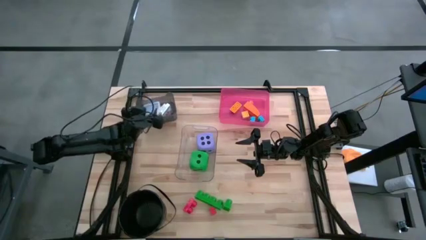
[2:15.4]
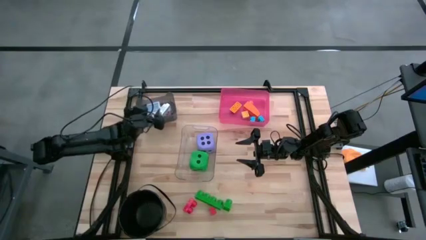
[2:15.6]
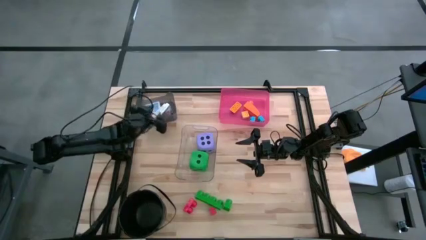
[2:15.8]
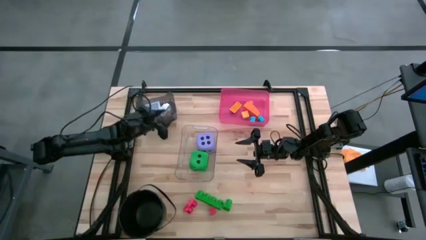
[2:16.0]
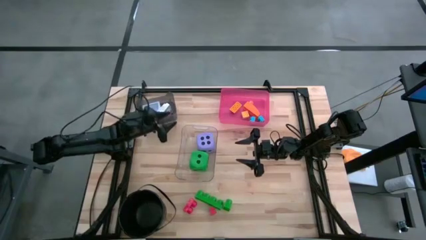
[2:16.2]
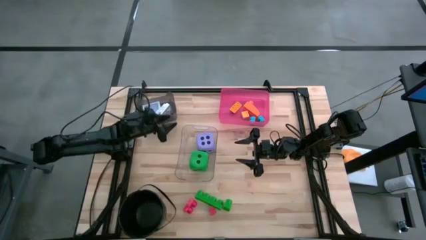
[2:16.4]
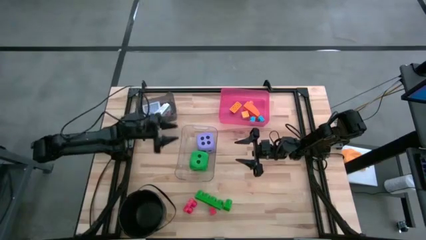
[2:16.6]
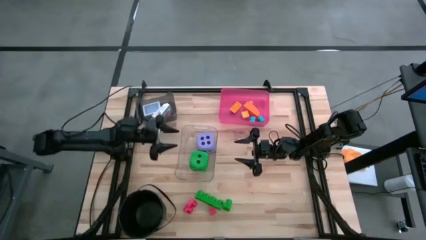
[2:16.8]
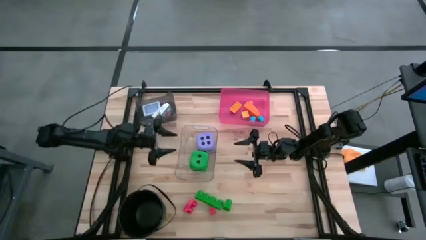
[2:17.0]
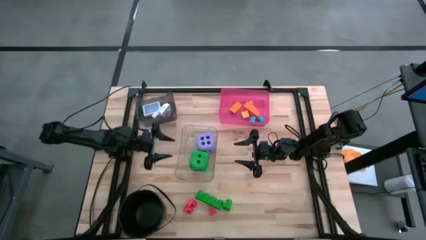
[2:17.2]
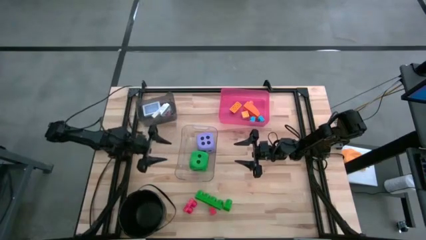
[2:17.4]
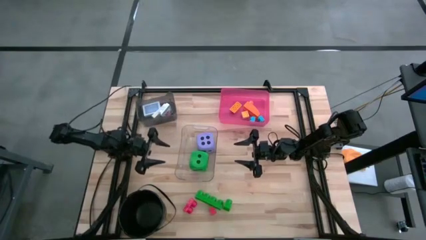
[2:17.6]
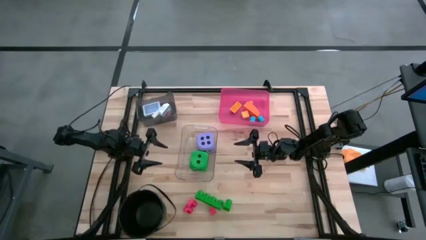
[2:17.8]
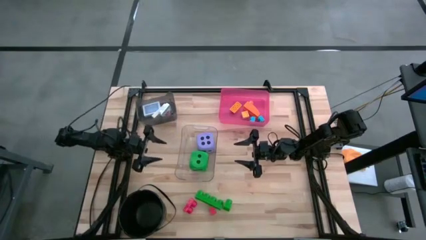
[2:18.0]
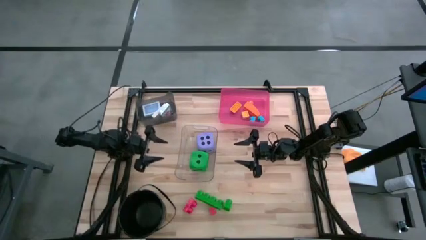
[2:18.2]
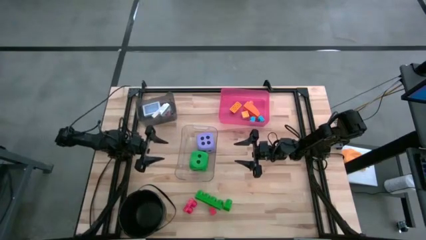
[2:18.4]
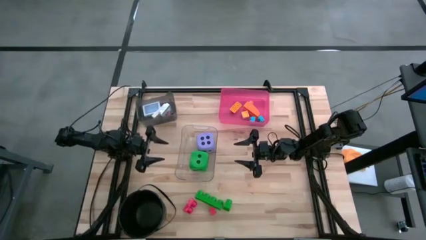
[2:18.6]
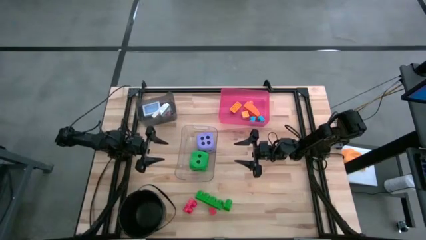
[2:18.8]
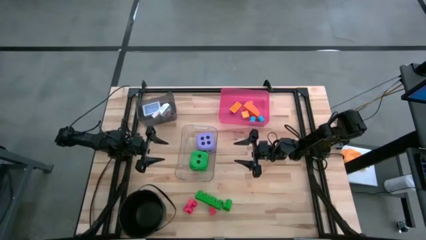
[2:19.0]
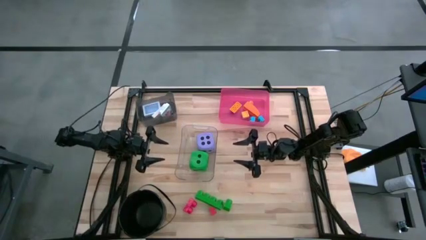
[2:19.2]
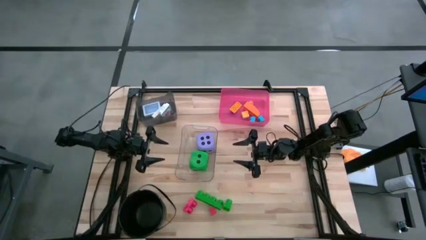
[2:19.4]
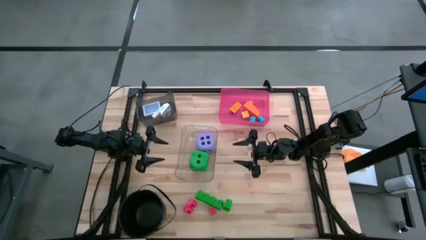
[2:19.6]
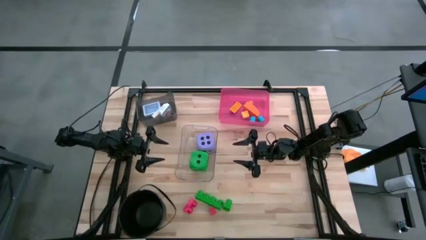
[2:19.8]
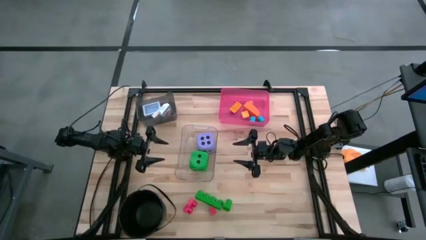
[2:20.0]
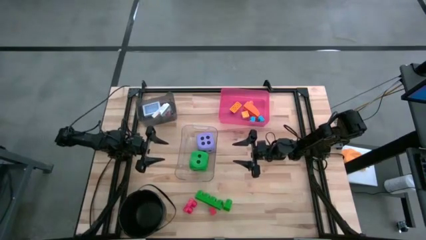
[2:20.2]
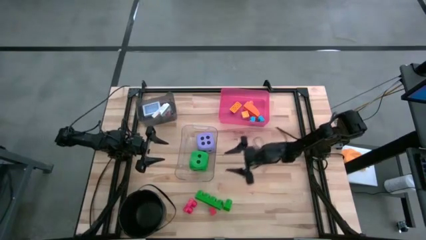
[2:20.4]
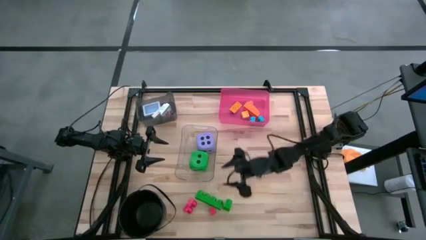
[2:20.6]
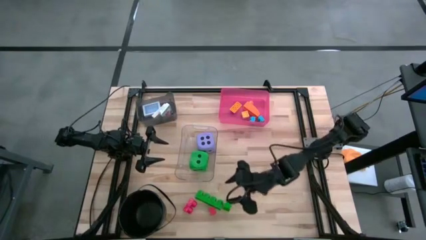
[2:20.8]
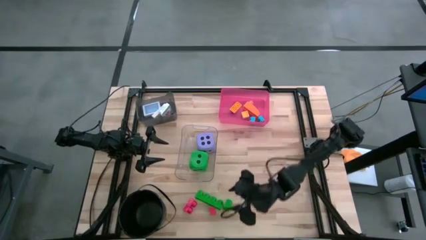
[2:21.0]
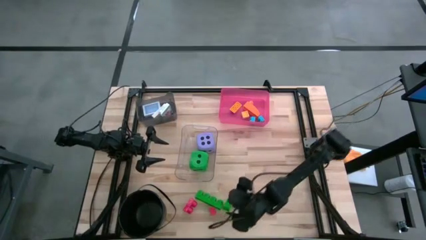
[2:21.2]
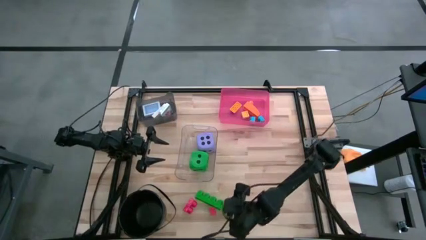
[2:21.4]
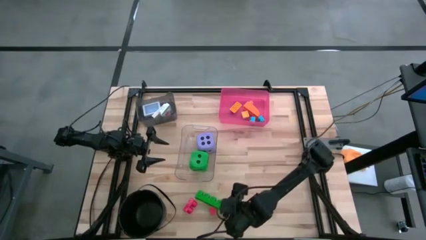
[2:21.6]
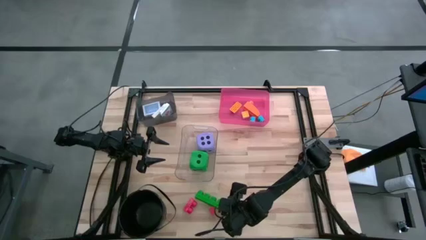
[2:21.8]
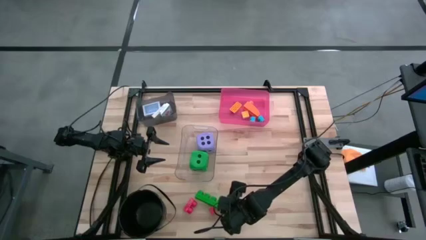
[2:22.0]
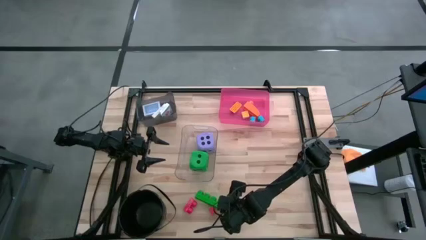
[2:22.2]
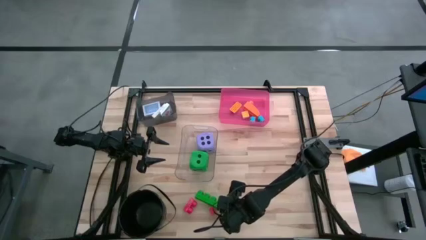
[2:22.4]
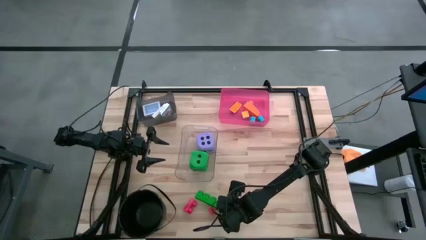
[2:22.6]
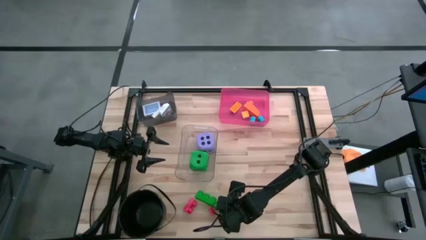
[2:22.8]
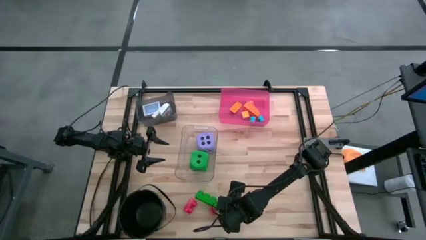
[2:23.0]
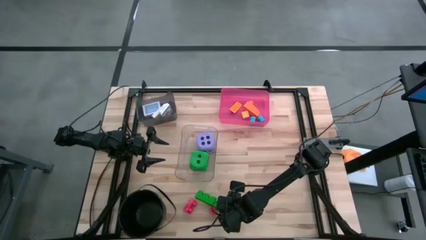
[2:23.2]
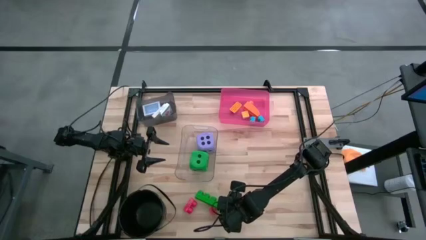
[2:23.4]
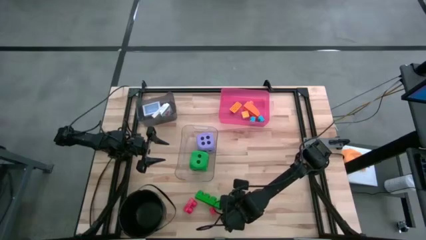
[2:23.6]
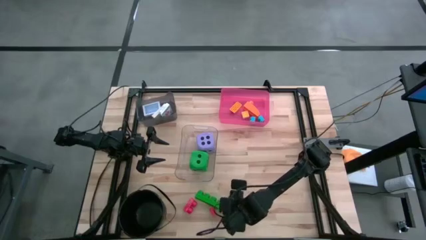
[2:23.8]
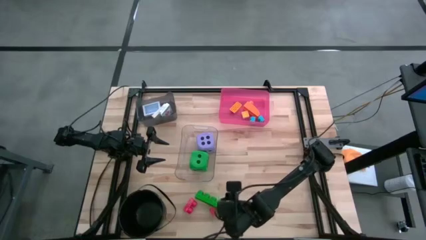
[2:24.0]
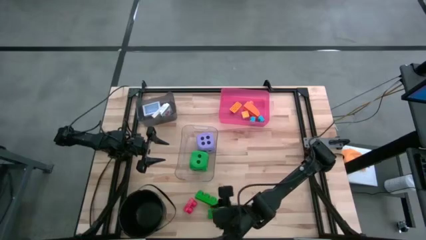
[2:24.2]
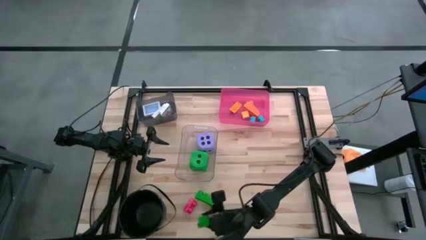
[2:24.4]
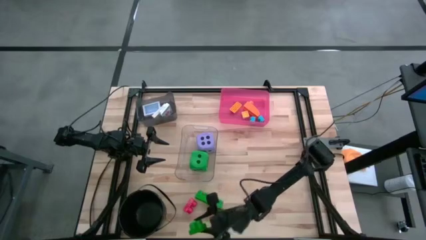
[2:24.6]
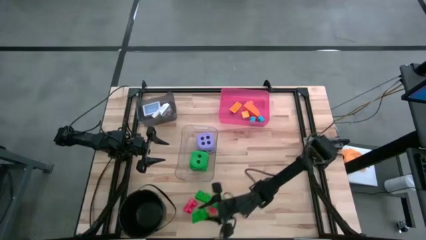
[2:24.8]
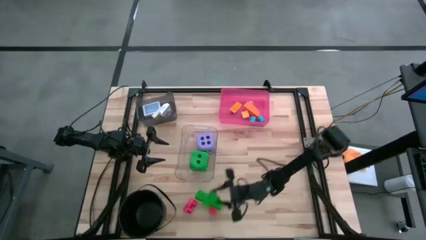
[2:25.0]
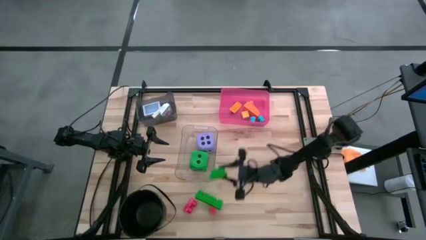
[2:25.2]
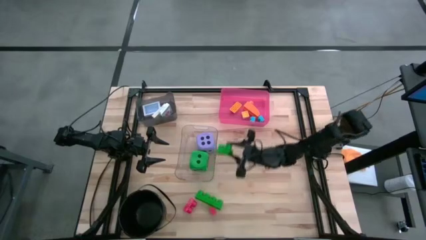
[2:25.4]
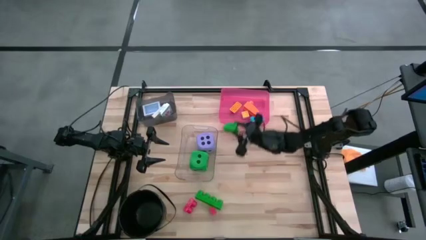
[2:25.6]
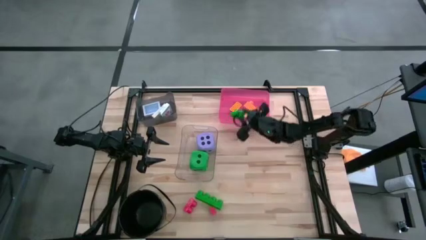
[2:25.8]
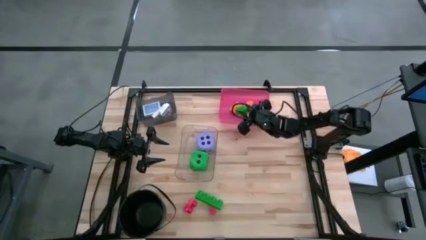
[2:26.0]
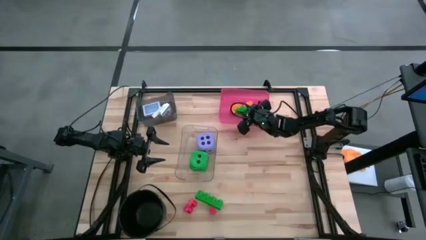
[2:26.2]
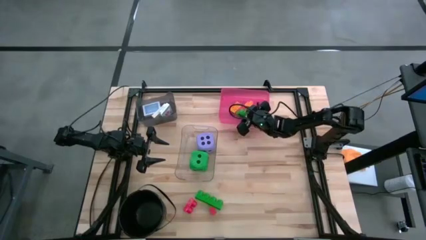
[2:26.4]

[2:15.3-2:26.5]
Task: Pick & Place Toys
Put the right green game piece into the pink bin

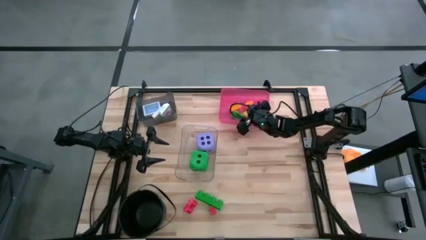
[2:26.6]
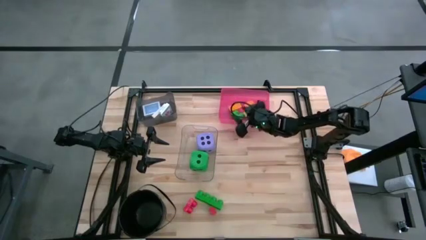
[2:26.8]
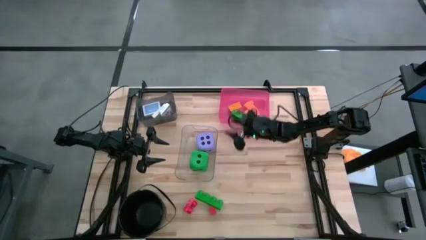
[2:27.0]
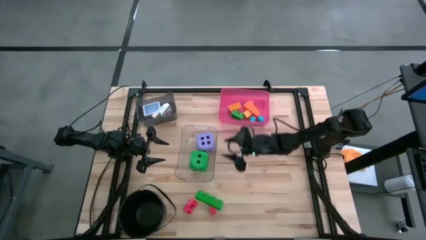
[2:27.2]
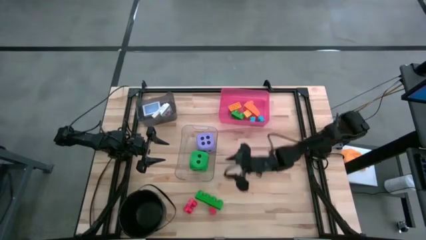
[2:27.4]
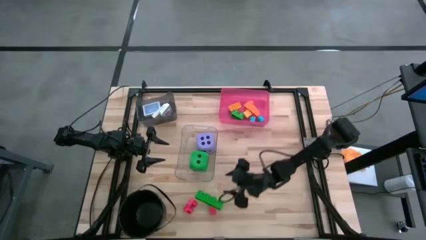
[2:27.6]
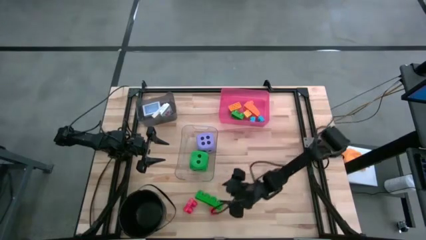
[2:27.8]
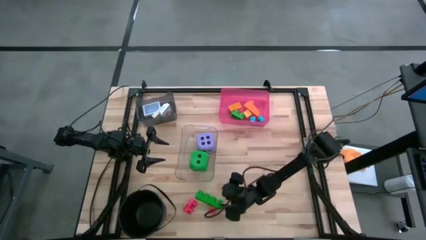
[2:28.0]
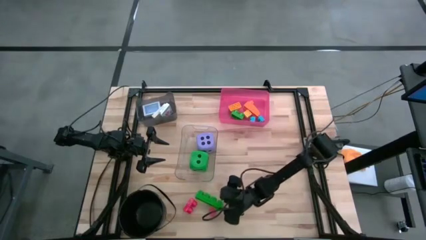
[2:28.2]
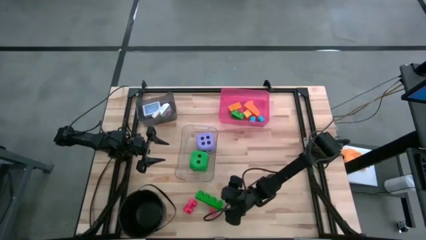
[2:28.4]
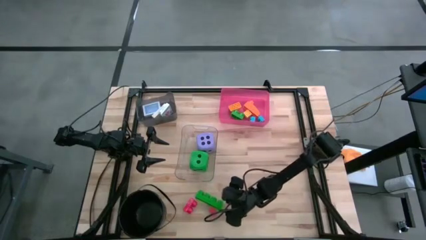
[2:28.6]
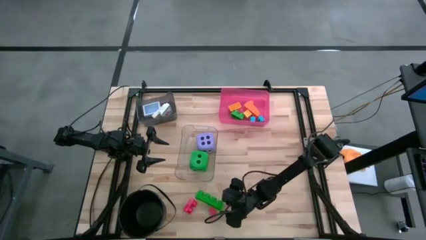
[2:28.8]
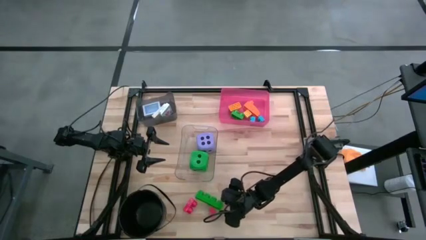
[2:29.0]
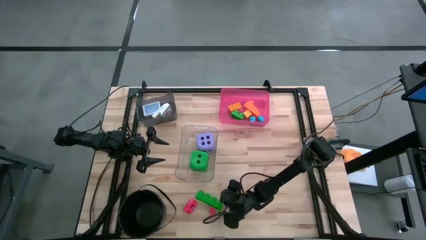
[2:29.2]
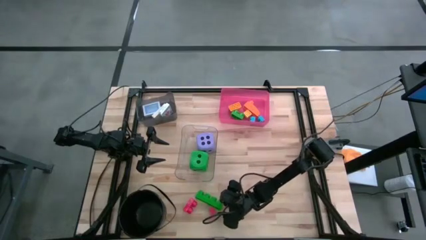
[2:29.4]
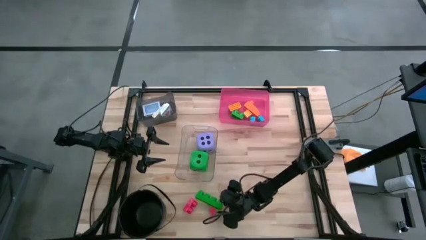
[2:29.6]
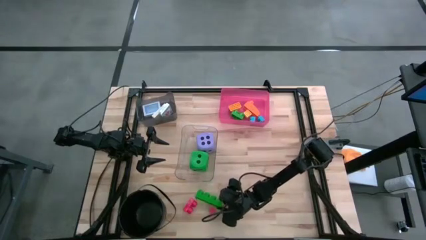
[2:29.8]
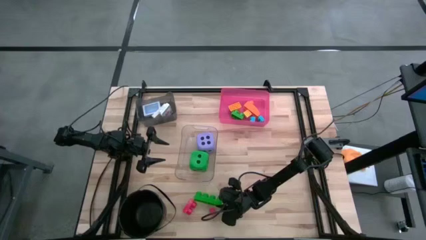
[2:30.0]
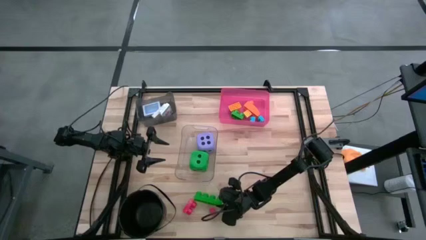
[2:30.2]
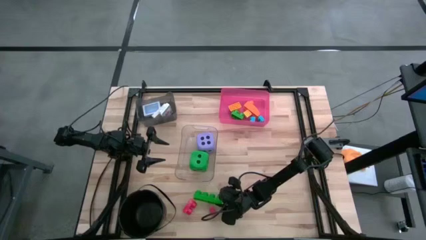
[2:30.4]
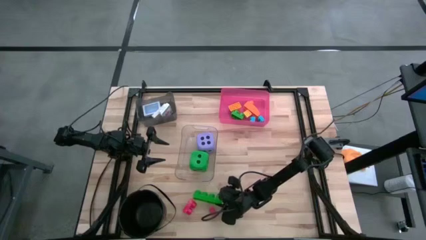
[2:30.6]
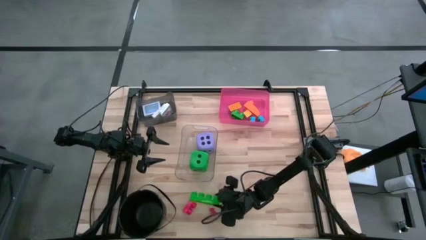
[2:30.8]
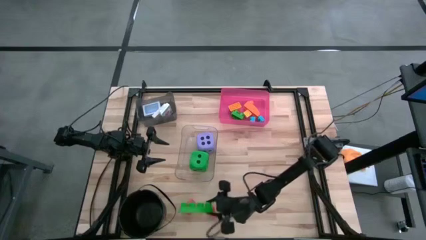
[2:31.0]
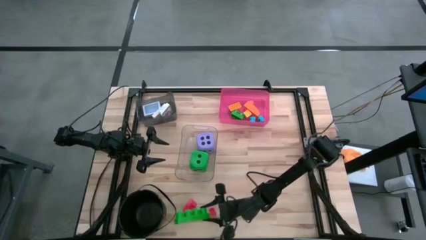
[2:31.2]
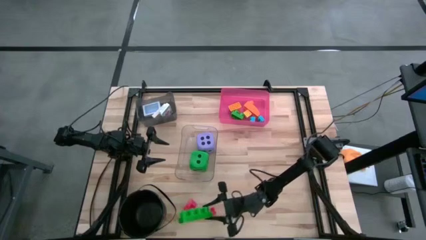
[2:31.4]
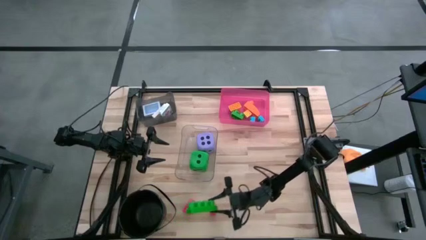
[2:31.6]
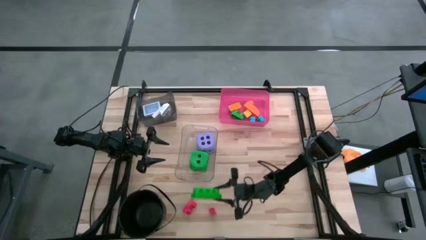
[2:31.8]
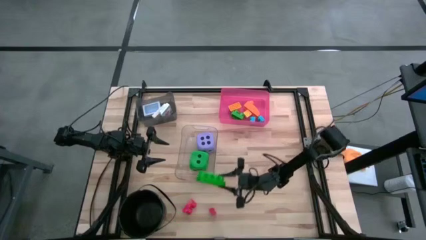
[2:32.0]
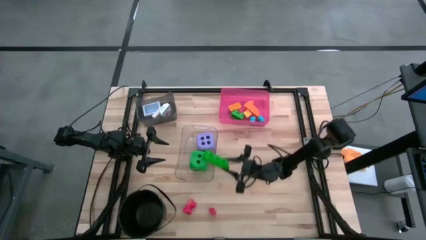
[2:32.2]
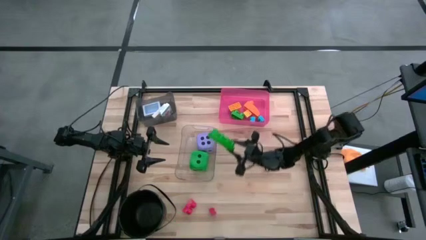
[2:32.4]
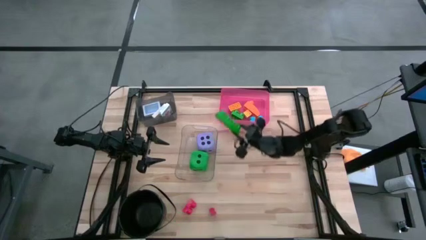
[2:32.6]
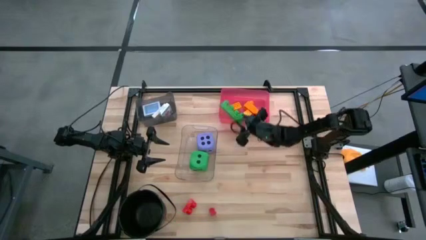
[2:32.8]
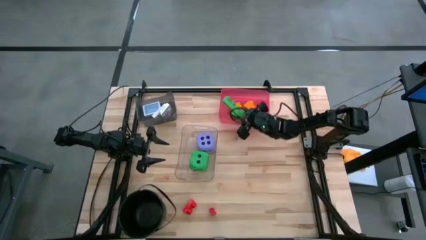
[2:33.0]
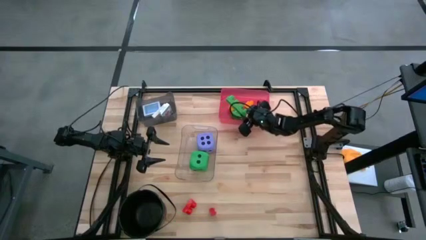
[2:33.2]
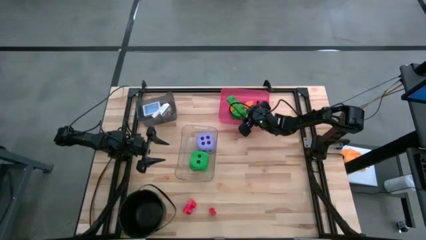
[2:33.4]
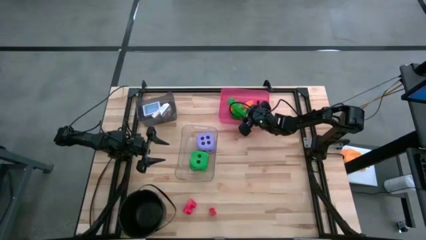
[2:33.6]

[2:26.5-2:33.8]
Put the green game piece into the pink bin
